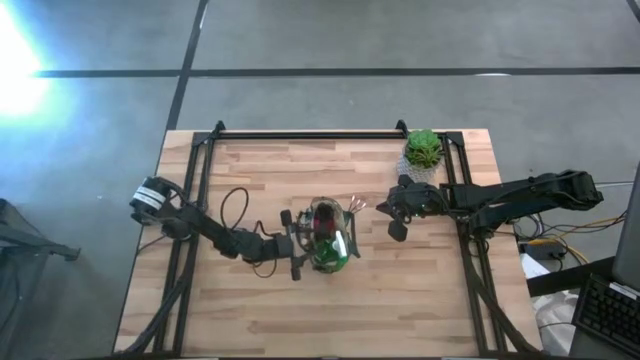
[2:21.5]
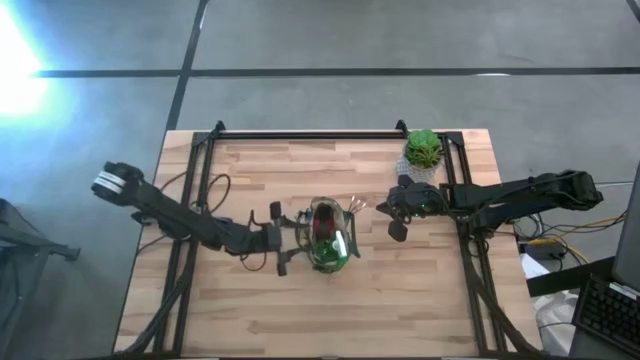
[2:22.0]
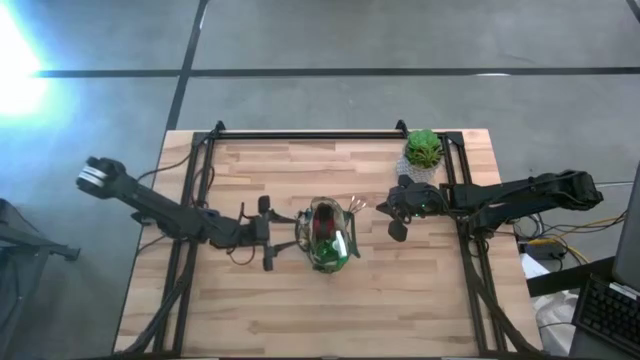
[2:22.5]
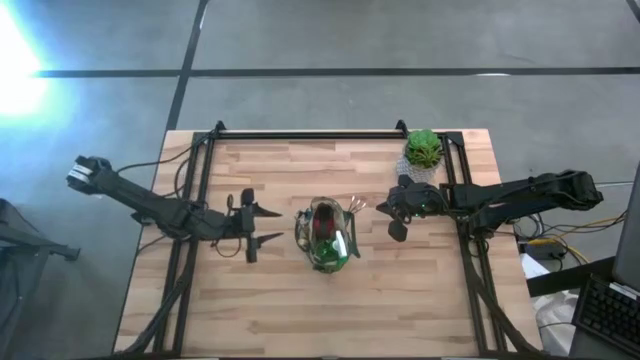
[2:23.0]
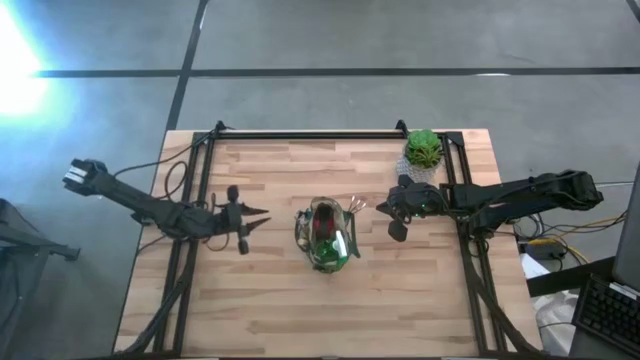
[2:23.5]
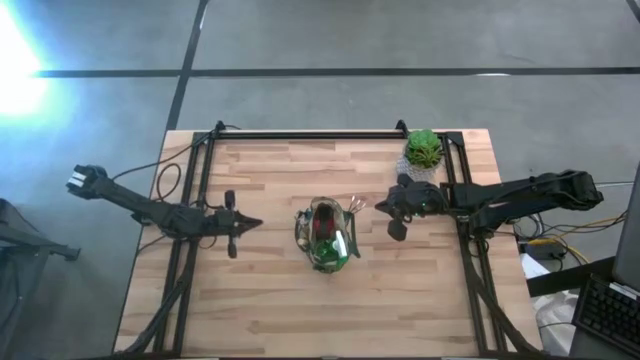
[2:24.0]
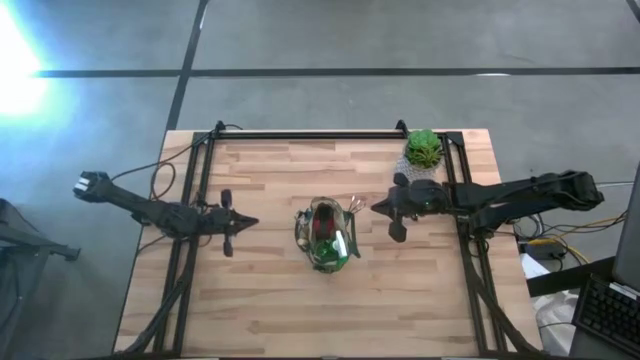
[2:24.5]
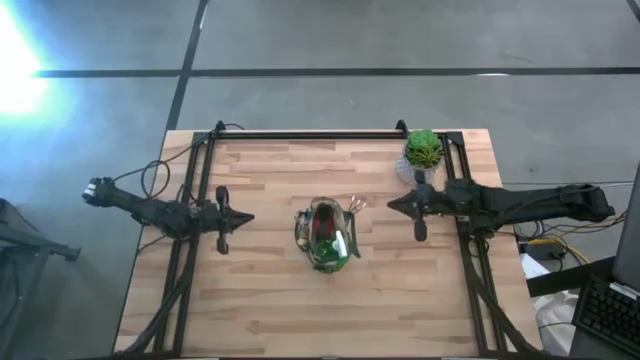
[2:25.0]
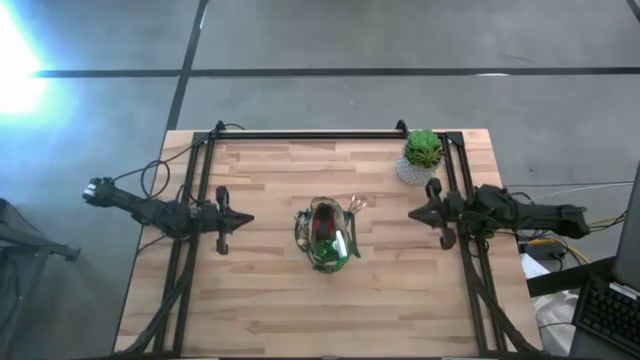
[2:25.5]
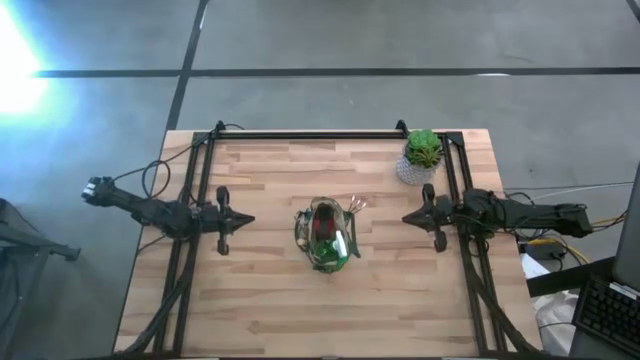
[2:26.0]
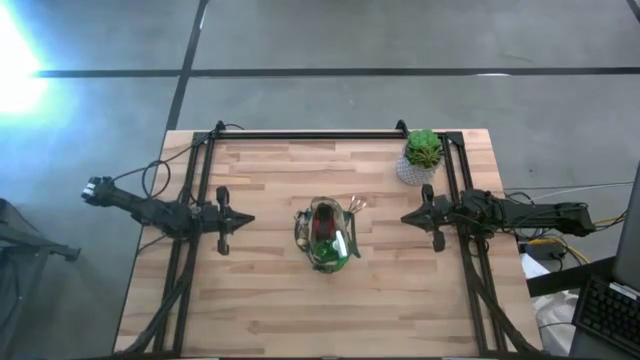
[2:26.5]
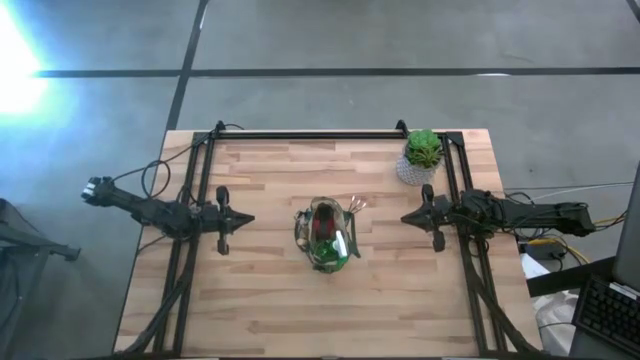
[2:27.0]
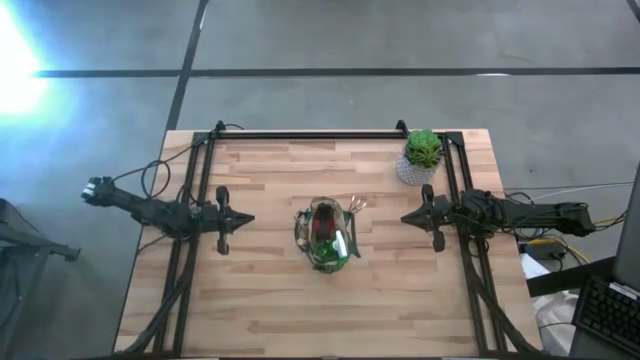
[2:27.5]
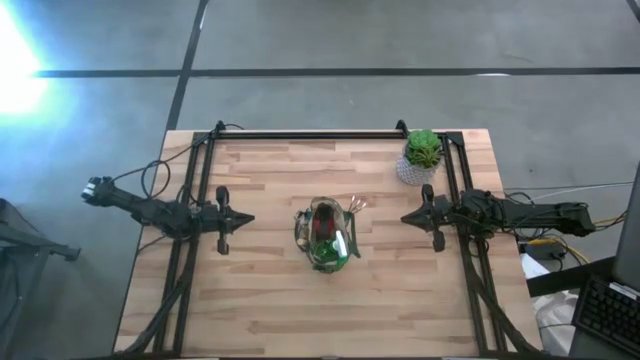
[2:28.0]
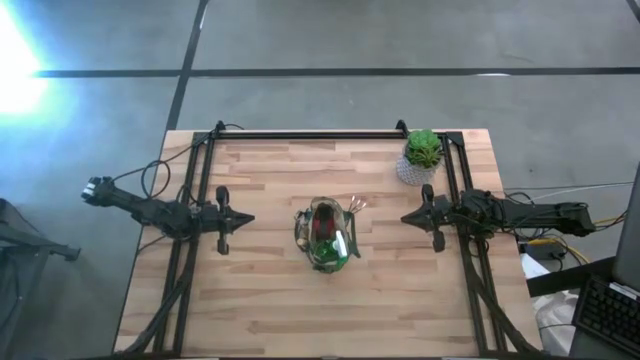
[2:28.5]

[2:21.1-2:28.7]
Task: Pick & Place Garden tools in Gardening bag
Return to Home Position

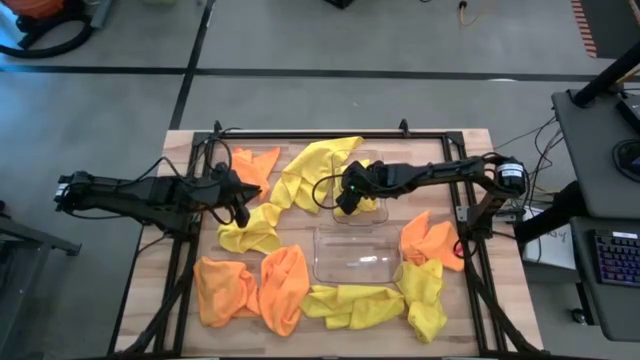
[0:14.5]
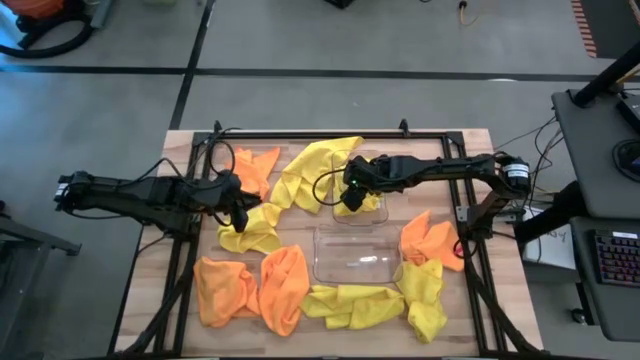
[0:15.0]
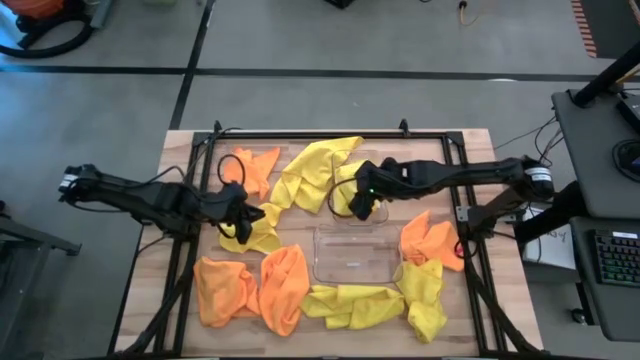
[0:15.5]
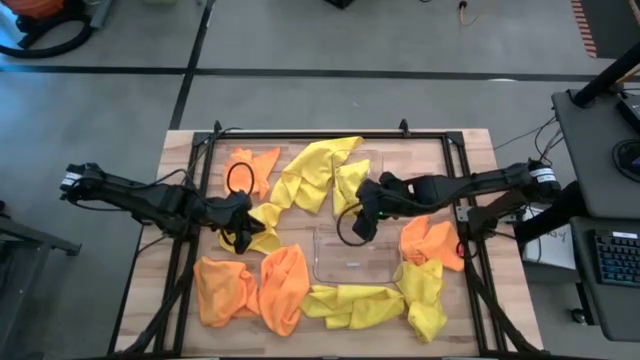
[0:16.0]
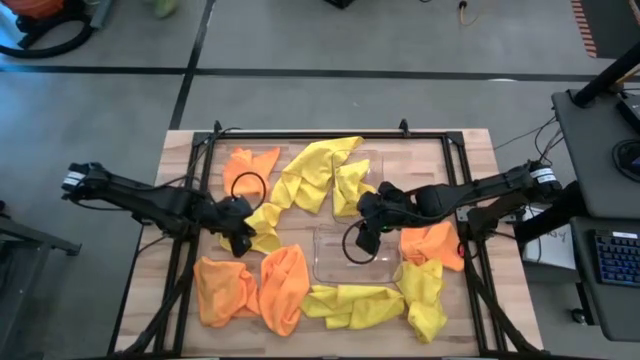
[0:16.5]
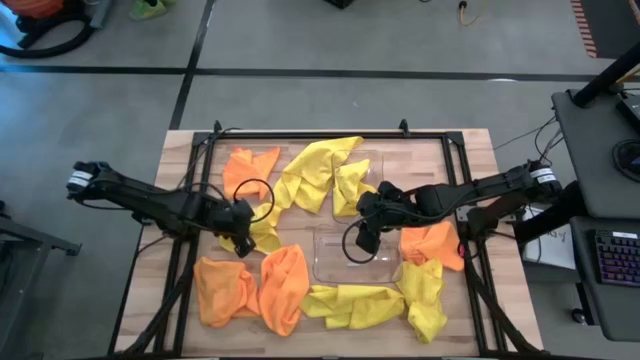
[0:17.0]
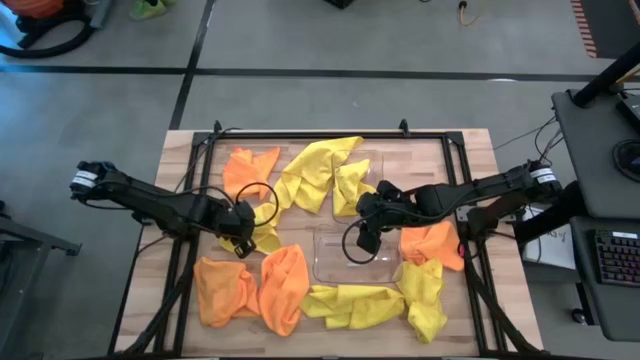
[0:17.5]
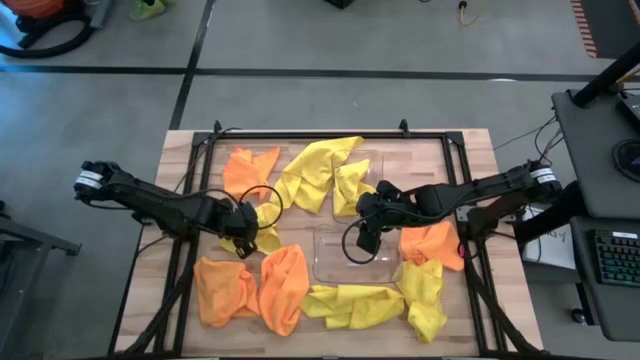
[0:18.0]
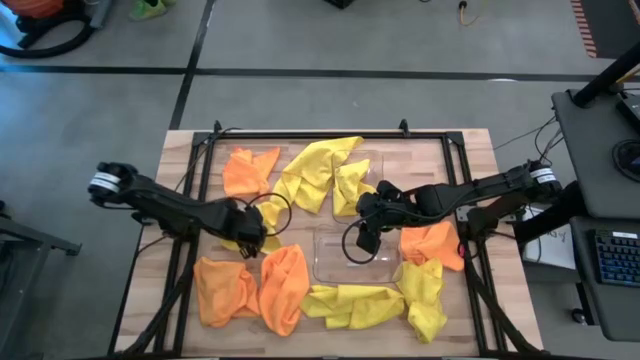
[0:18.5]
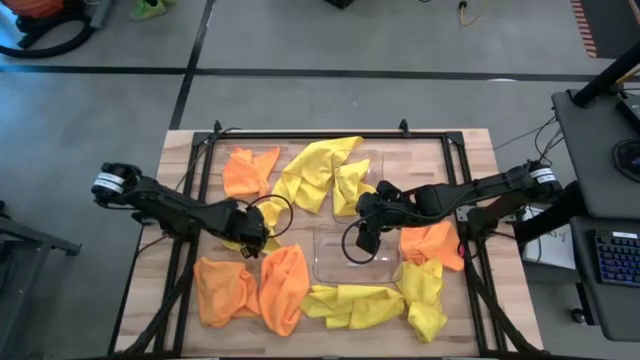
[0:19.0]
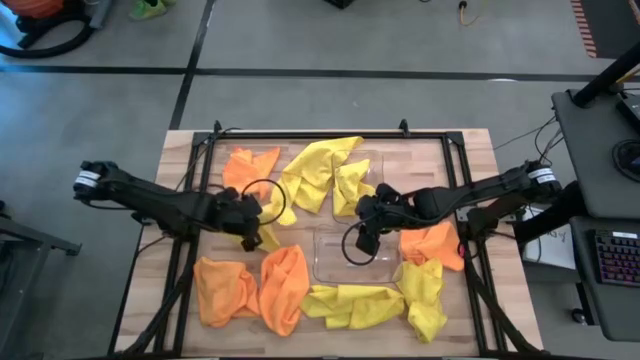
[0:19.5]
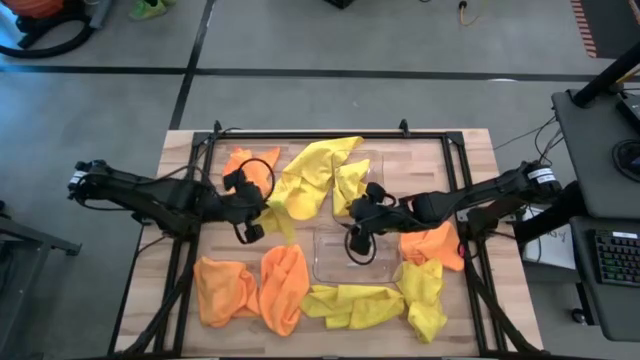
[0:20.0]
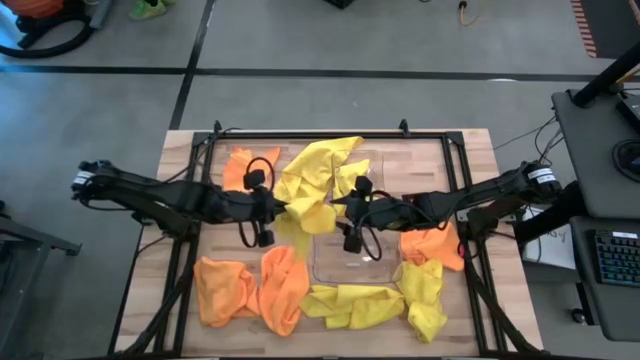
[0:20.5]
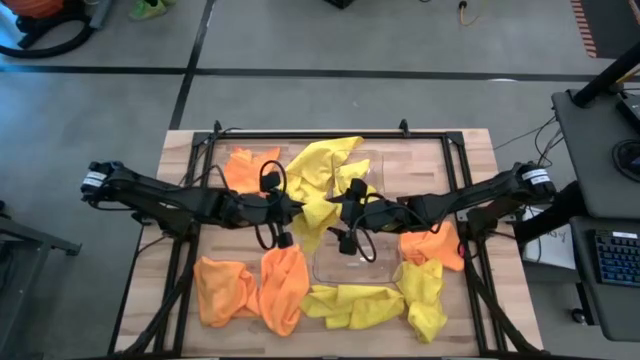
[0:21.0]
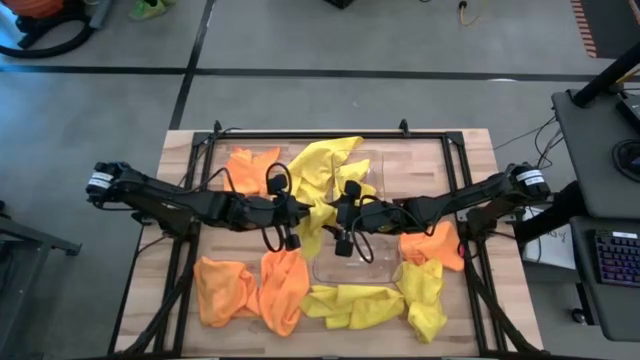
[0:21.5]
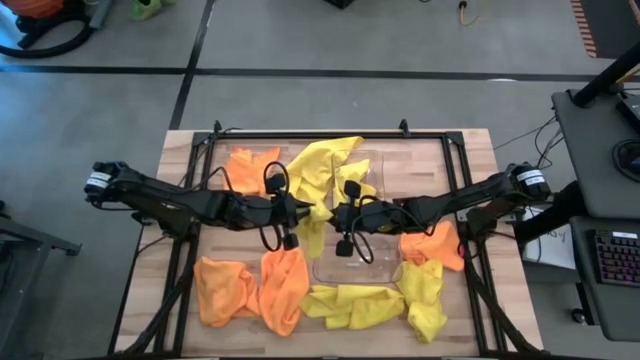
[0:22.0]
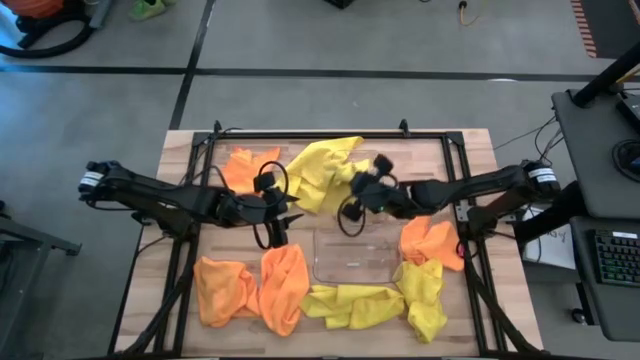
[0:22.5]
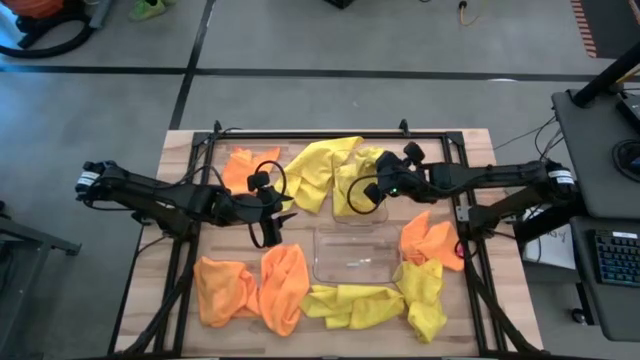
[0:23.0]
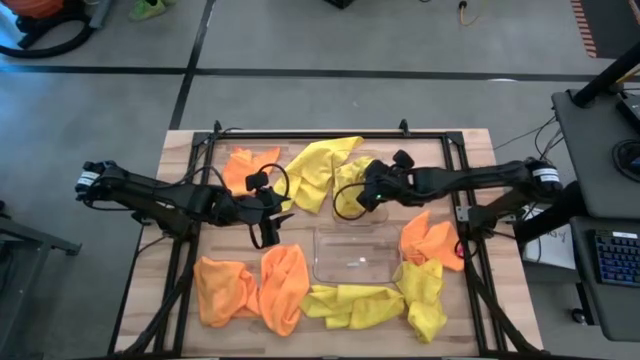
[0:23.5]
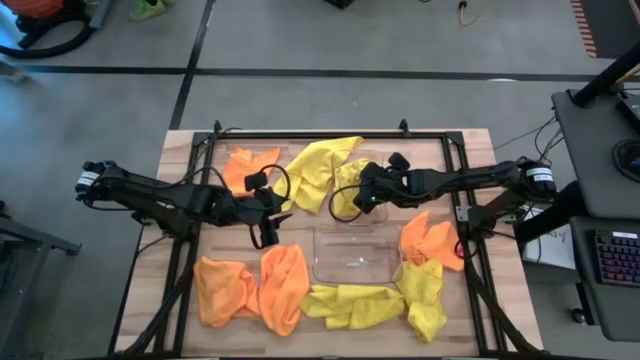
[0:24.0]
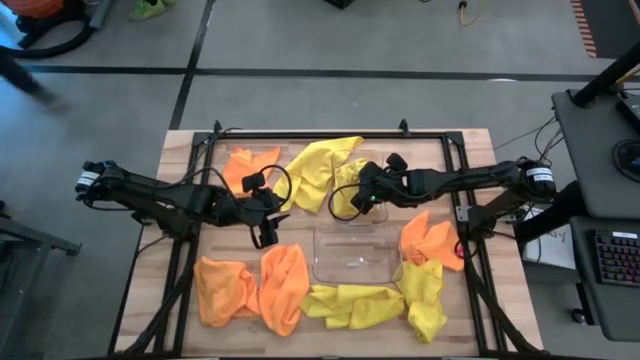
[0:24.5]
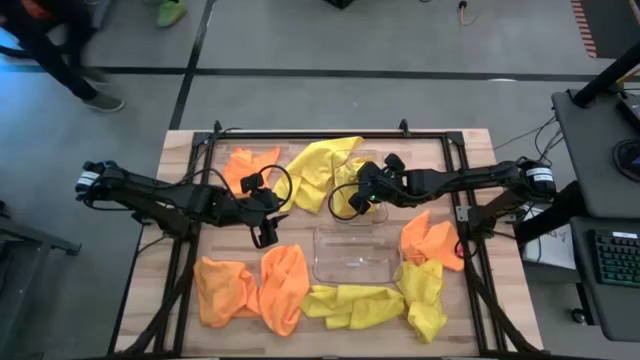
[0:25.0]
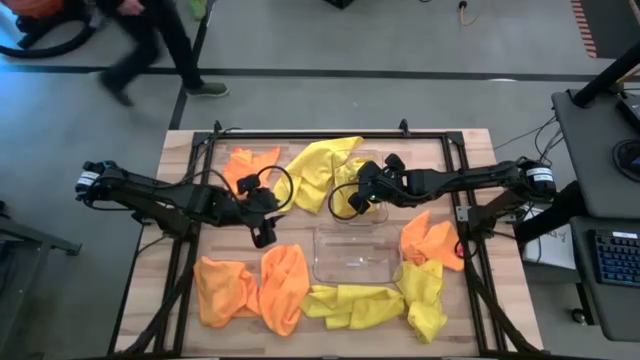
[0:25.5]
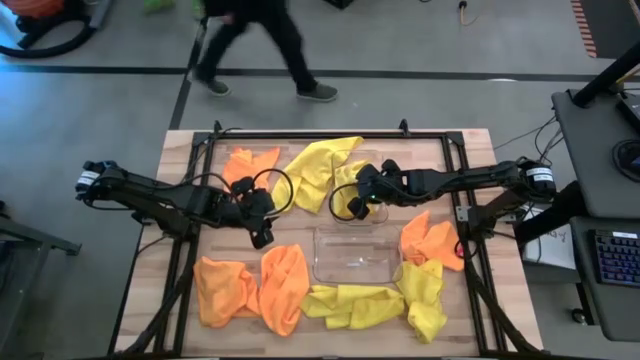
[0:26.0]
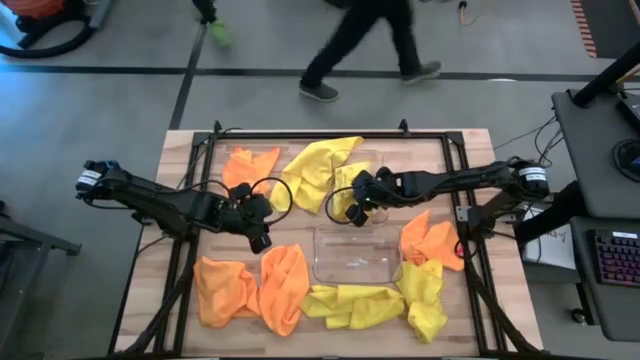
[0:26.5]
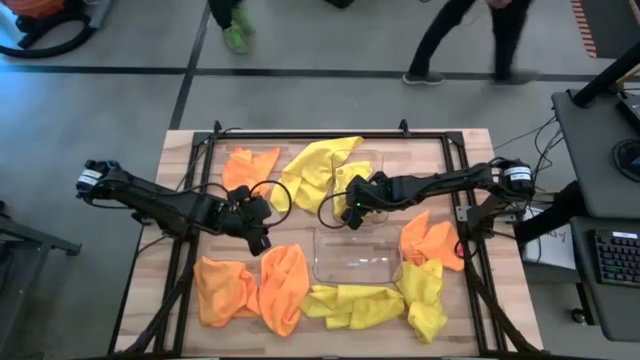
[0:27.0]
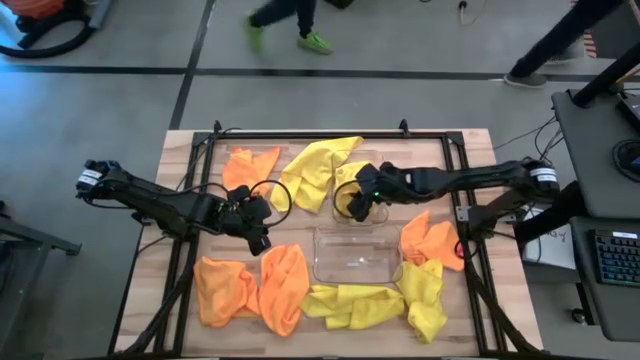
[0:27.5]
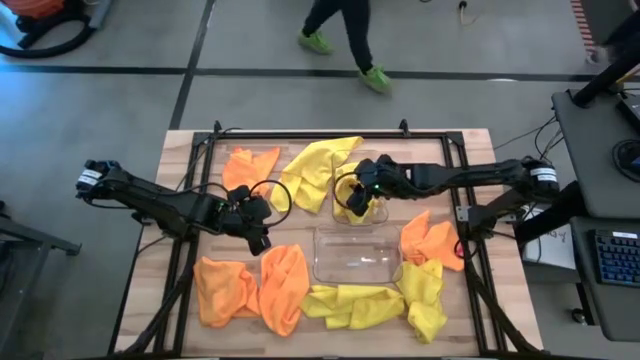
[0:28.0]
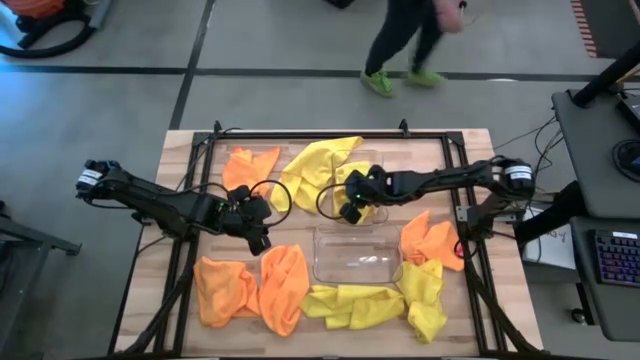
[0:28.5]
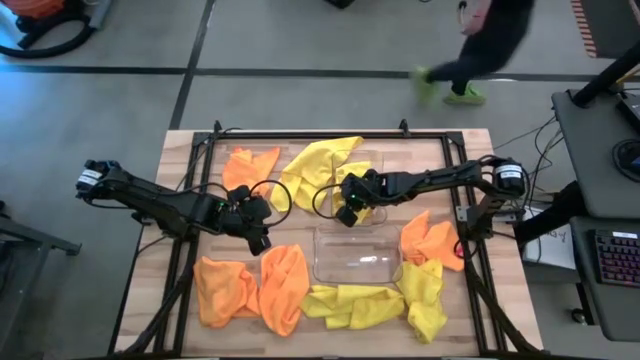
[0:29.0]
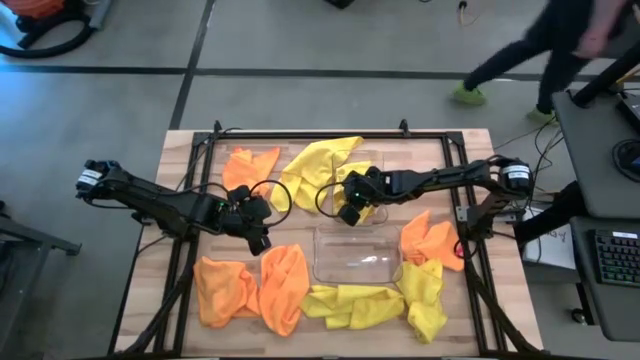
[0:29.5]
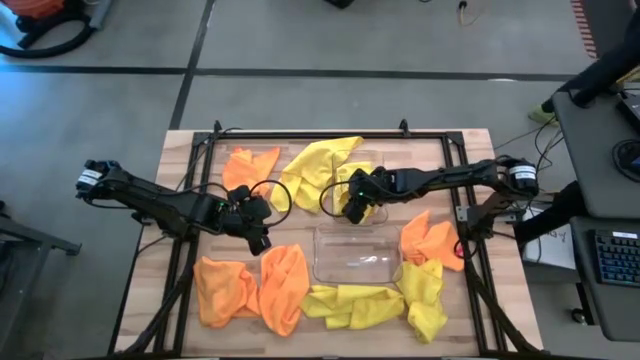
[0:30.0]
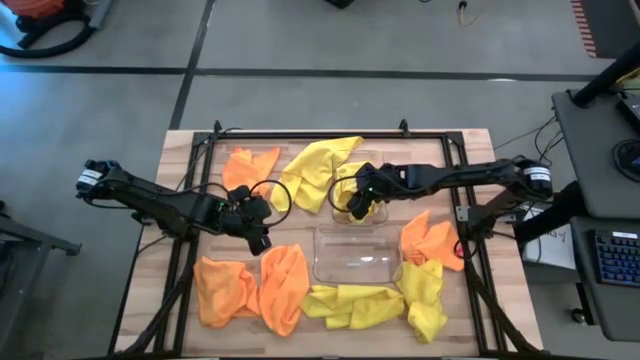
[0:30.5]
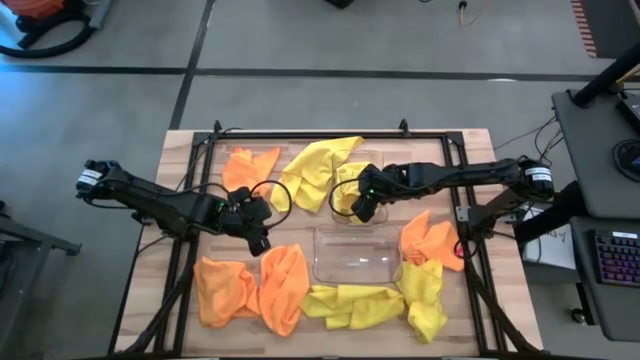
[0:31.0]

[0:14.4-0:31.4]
Task: Sort microfiber towel by color & place in baskets
Put the yellow towel into the top transparent bin
